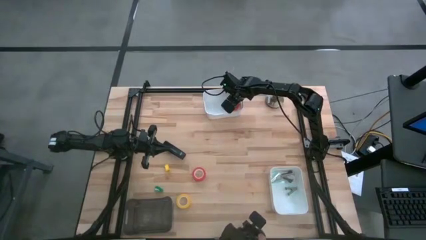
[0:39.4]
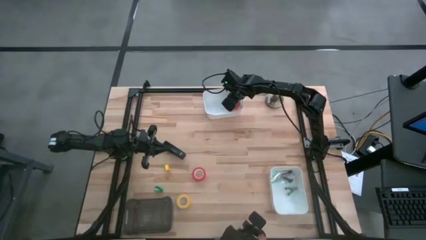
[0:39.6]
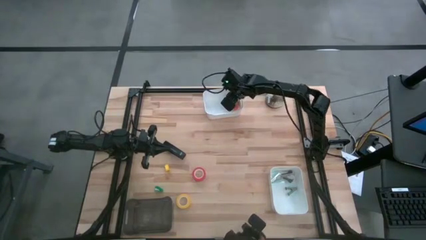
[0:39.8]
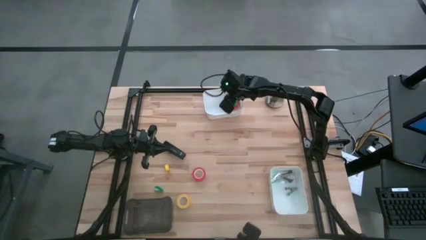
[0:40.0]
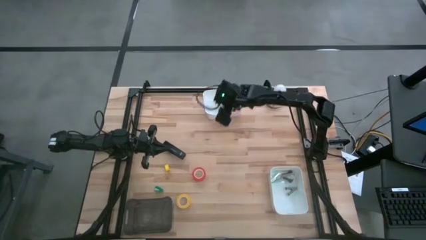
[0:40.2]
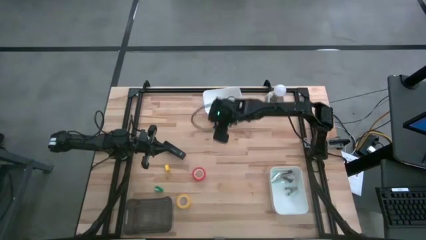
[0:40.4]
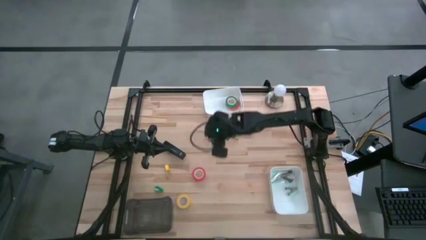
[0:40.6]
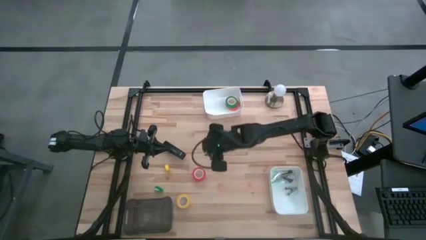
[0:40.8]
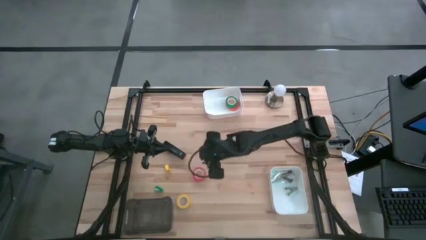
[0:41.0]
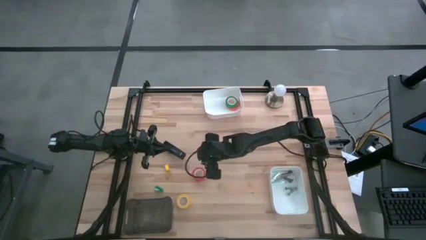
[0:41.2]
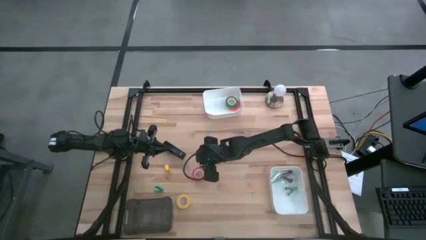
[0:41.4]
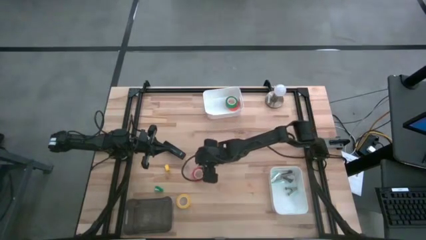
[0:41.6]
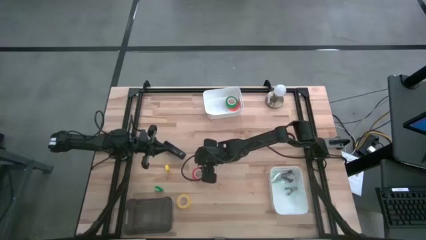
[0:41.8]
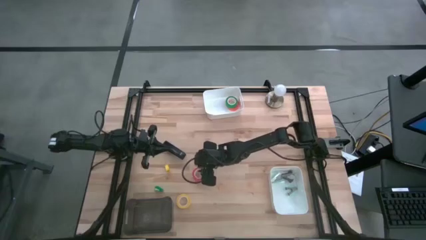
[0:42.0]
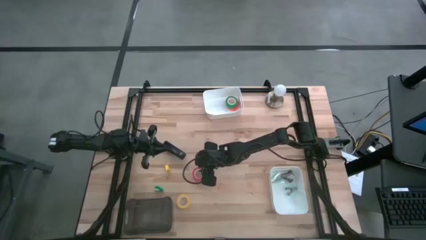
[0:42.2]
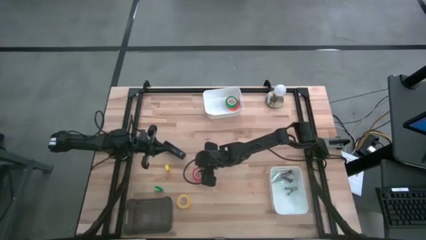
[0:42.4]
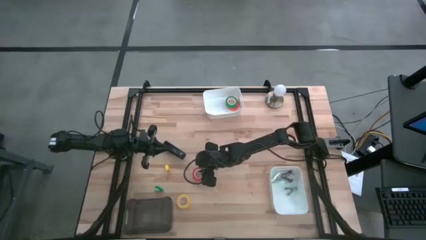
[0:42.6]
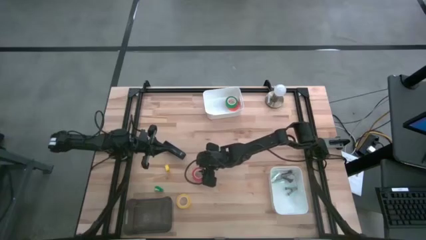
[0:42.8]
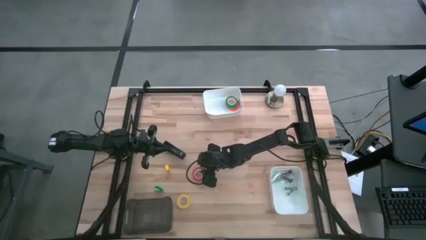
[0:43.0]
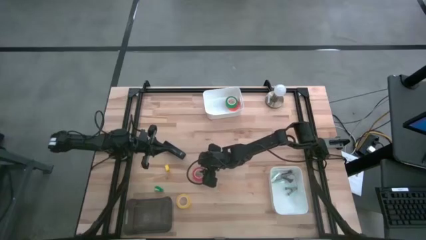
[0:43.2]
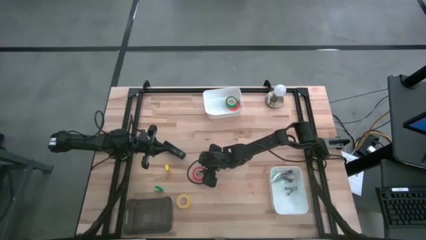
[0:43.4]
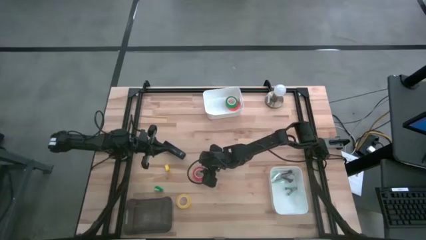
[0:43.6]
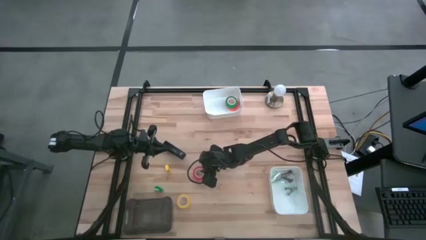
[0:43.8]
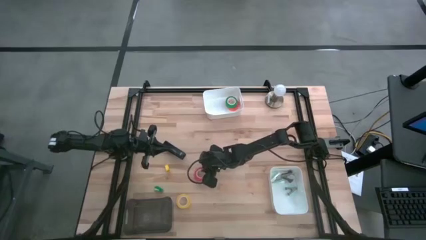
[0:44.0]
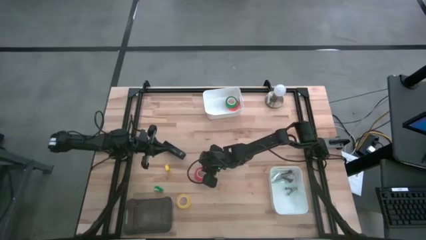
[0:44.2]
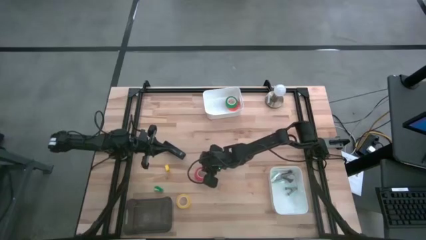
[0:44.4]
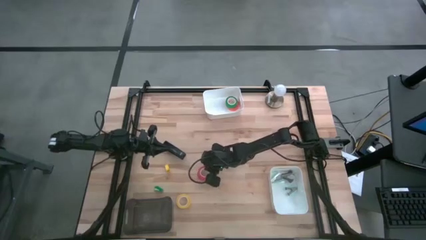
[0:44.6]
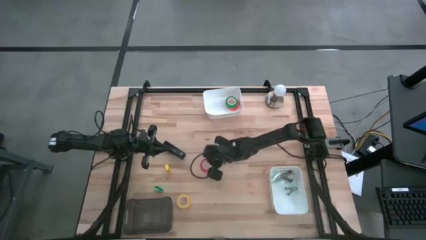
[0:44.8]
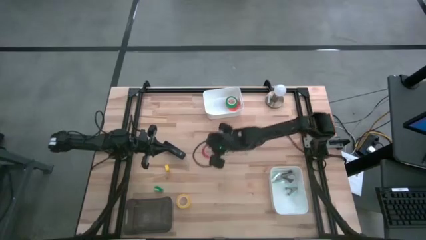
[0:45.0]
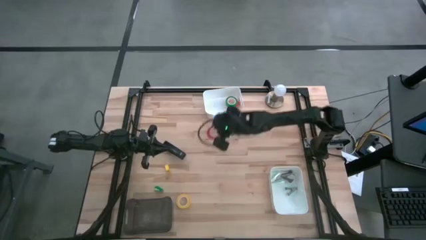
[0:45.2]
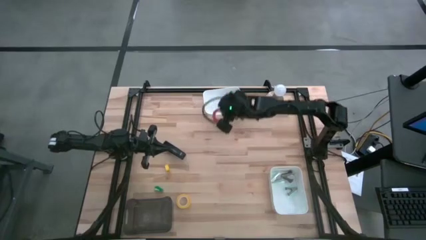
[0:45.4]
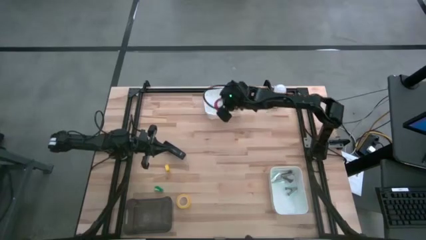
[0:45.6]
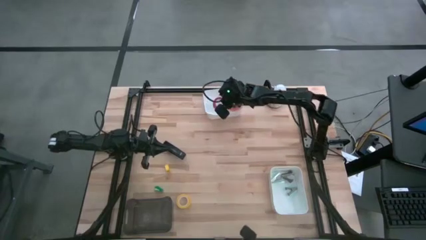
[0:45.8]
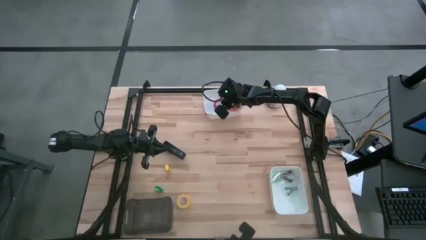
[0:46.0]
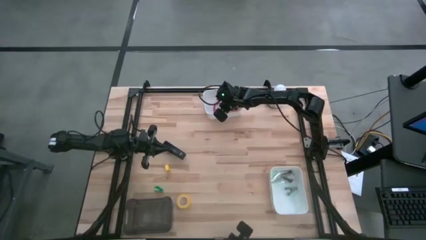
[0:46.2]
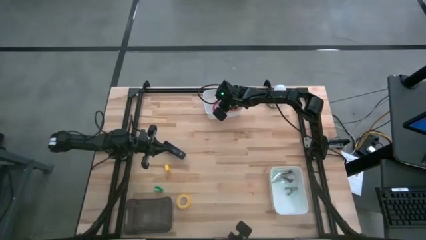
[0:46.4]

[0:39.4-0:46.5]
Task: Pick and place Stapler, Stapler remover, tape
Put the red tape into the top white bin

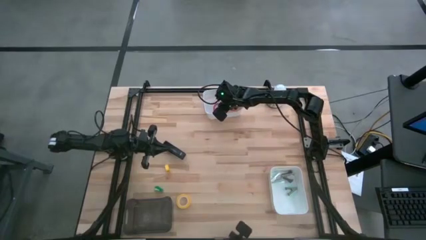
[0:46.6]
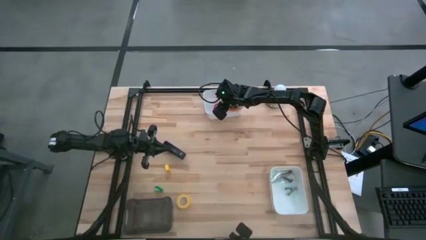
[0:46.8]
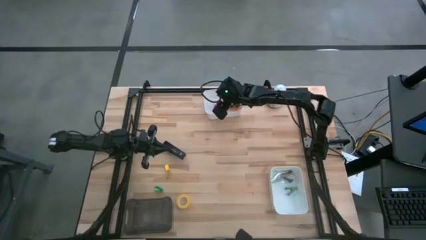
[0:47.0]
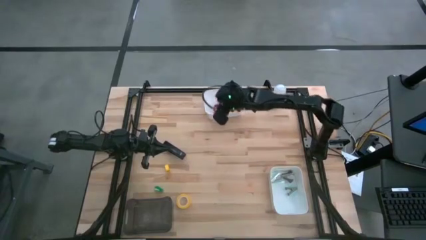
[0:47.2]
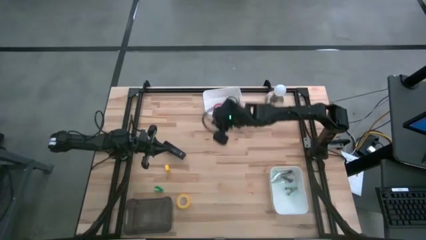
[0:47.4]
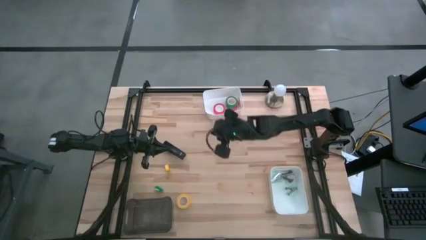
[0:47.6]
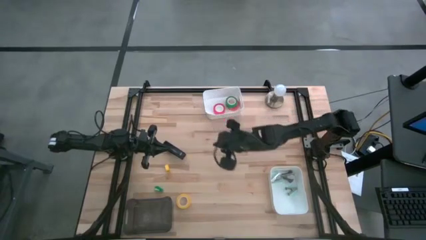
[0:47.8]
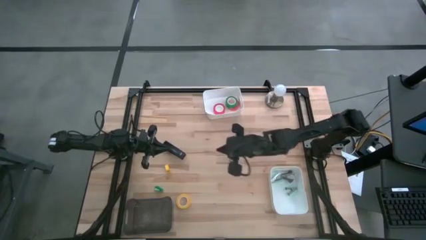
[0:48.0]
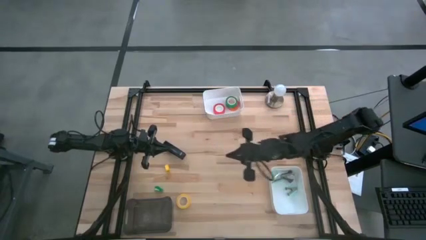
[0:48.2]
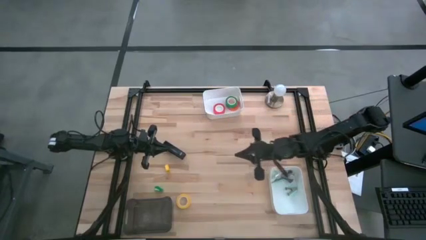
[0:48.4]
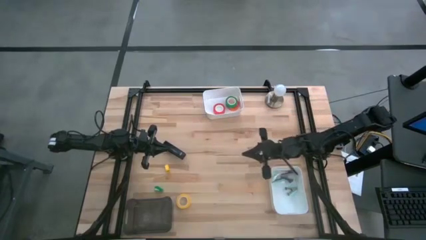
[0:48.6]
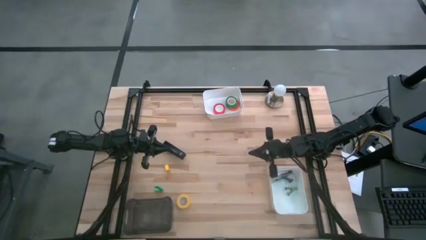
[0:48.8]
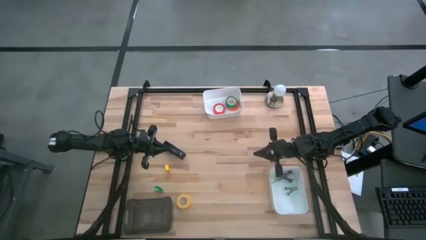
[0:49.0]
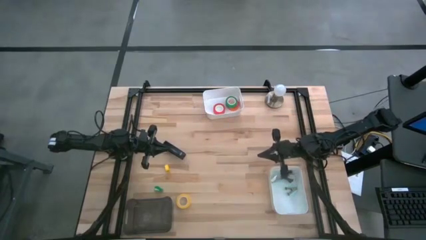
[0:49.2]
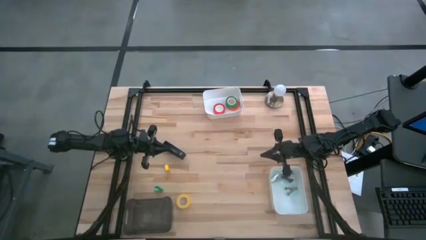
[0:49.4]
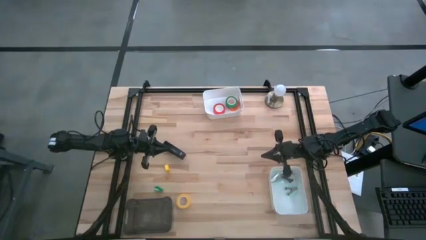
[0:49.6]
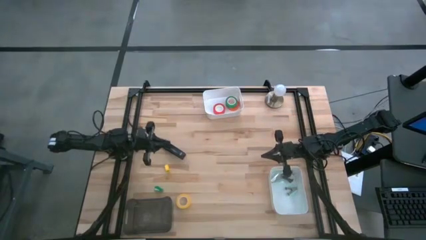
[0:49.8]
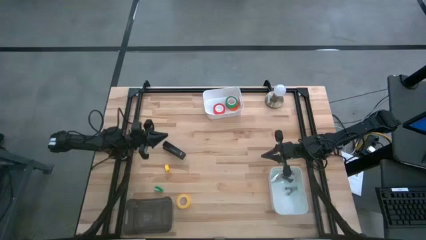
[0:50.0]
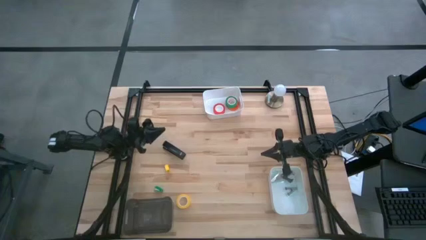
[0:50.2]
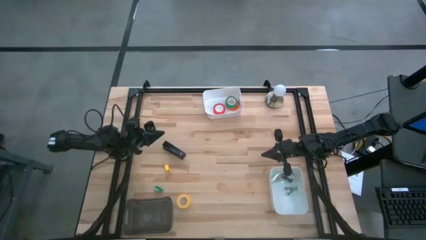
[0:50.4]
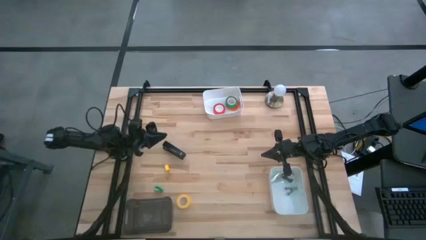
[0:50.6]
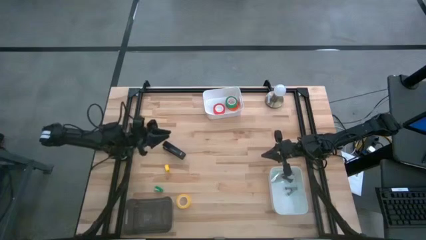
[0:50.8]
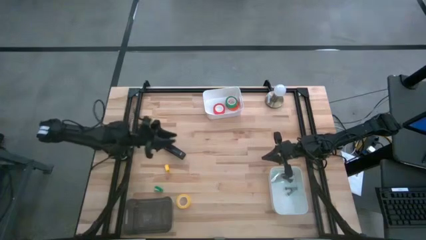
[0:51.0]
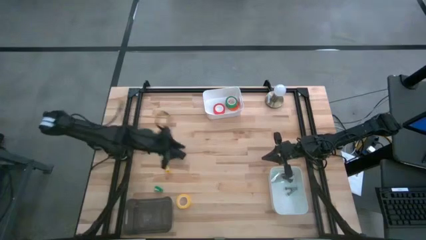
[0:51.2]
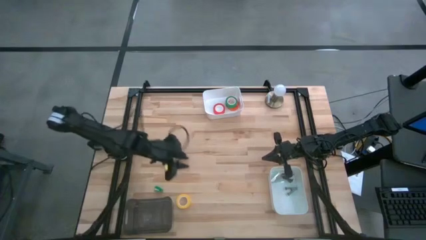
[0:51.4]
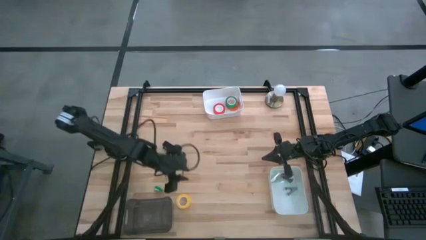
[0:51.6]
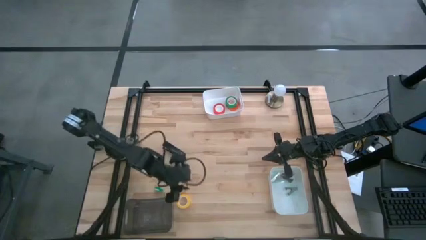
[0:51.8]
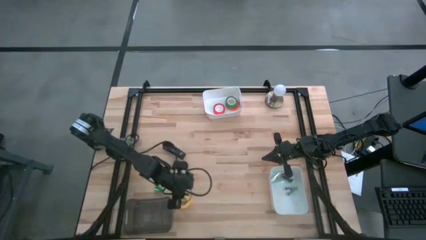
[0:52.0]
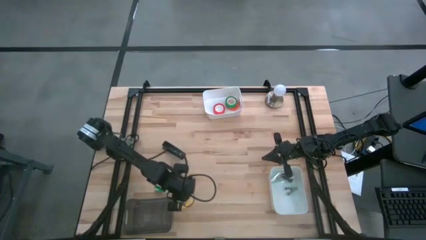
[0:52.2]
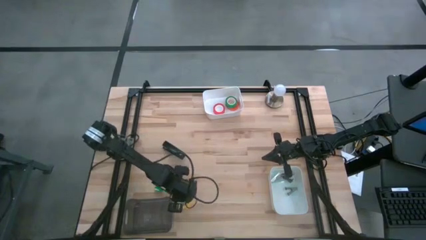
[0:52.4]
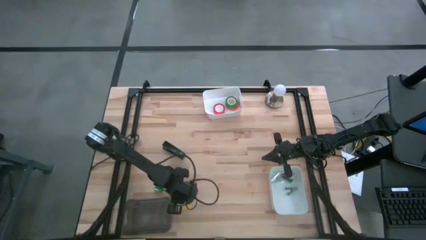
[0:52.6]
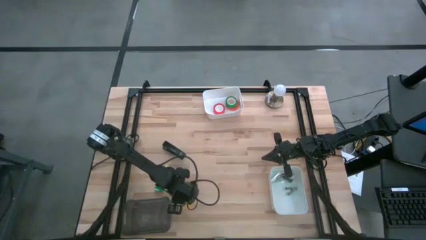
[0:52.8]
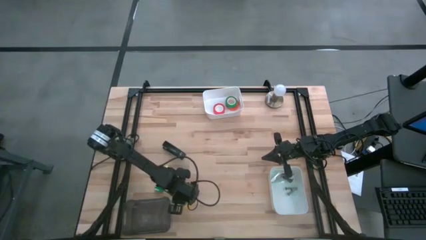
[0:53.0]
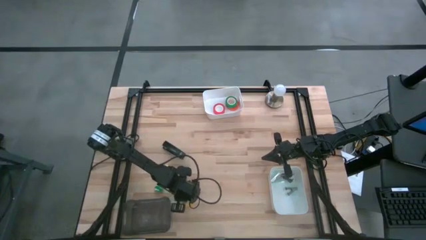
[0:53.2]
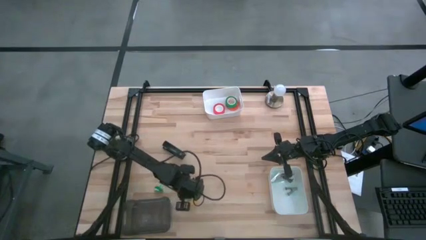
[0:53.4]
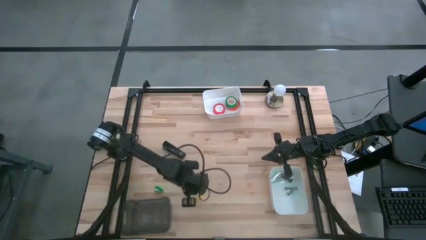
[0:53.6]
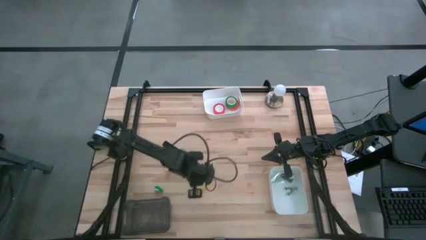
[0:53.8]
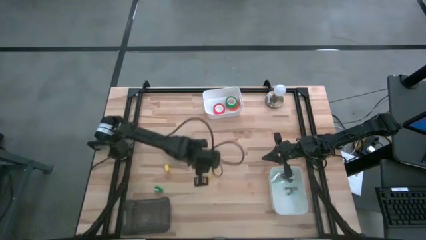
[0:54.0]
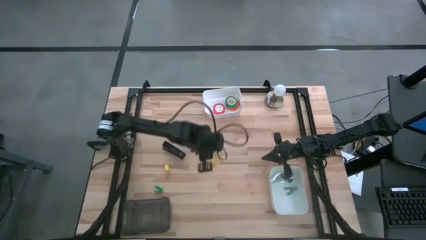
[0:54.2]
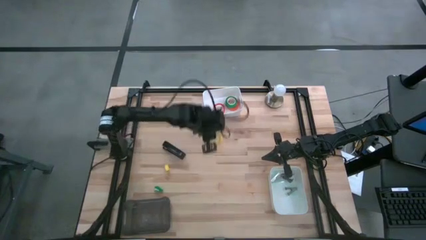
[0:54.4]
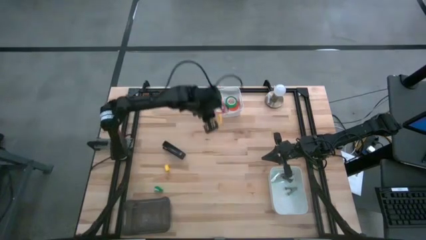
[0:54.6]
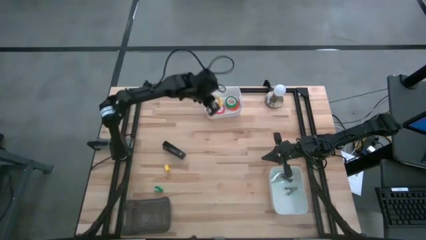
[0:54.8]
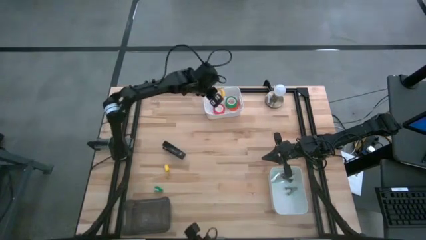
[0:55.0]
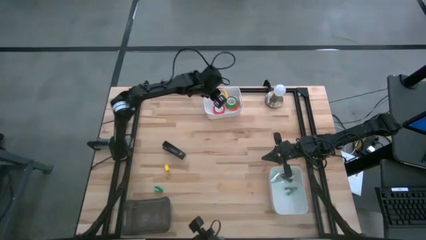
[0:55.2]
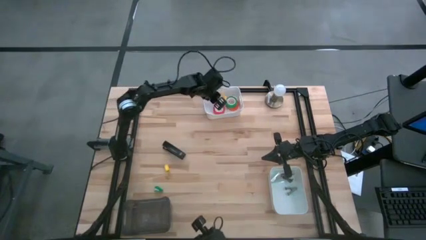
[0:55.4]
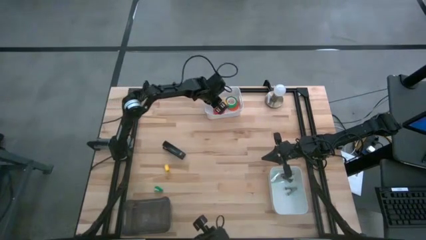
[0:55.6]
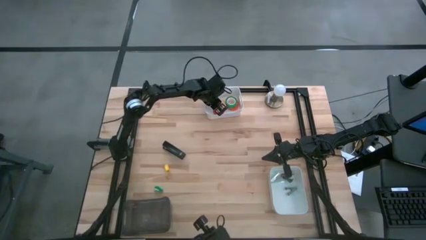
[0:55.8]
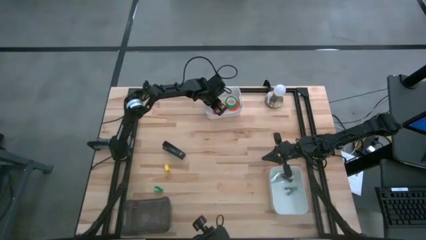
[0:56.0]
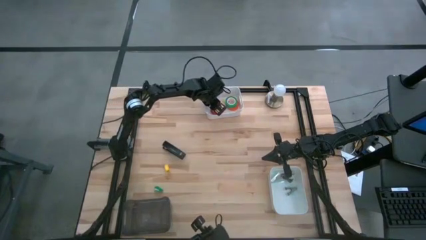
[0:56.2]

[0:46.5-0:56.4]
Put the yellow tape into the white bin
